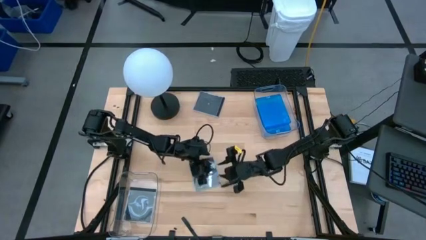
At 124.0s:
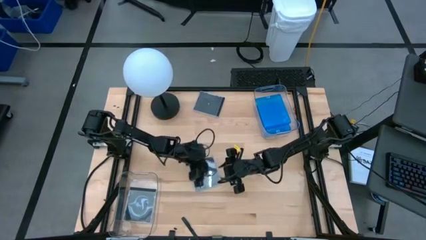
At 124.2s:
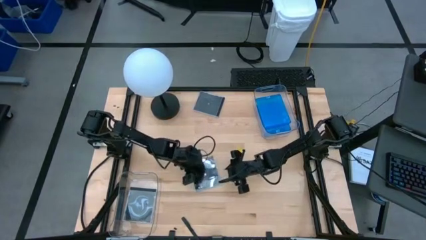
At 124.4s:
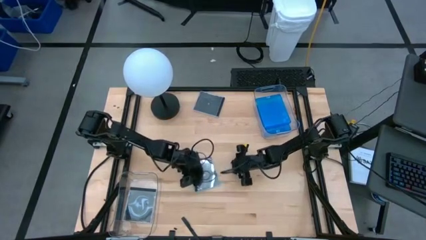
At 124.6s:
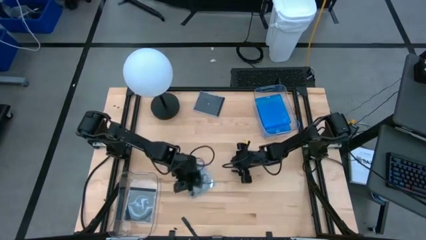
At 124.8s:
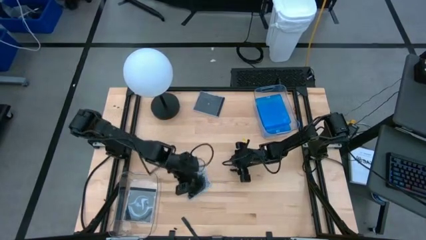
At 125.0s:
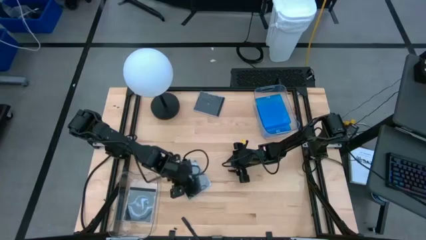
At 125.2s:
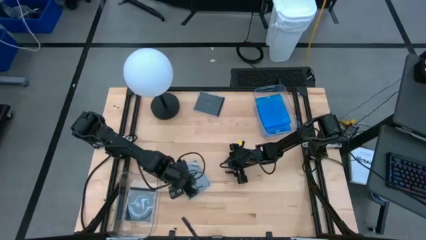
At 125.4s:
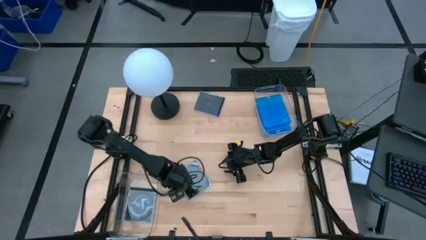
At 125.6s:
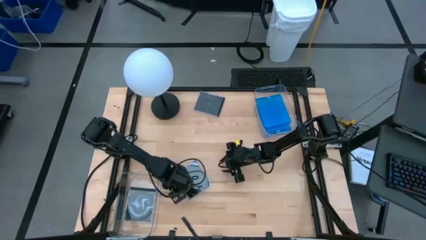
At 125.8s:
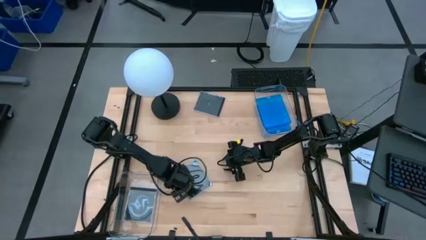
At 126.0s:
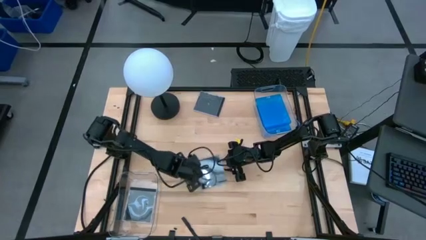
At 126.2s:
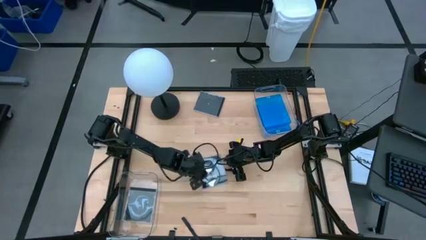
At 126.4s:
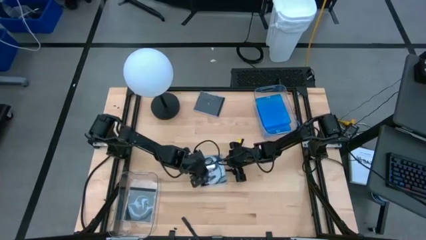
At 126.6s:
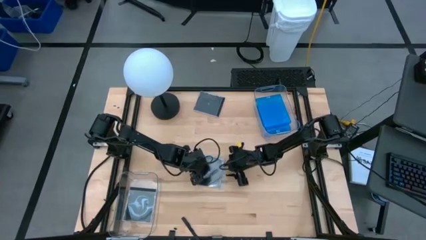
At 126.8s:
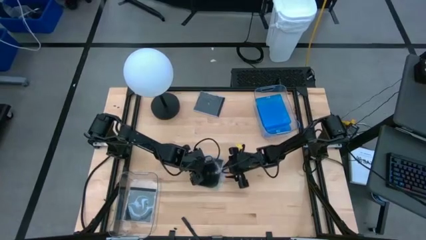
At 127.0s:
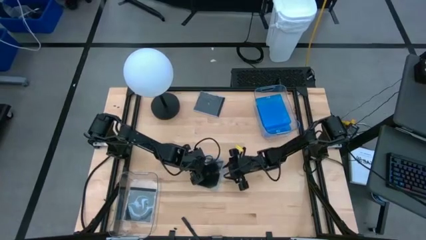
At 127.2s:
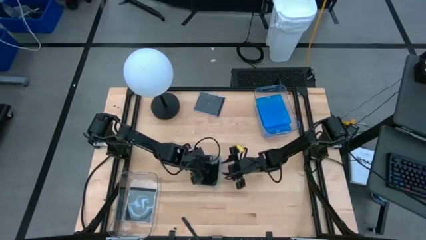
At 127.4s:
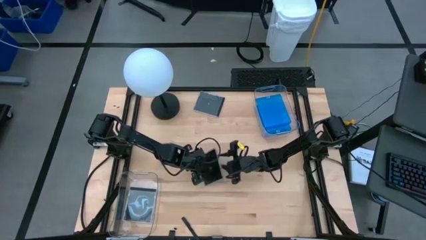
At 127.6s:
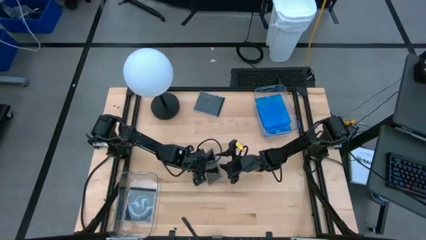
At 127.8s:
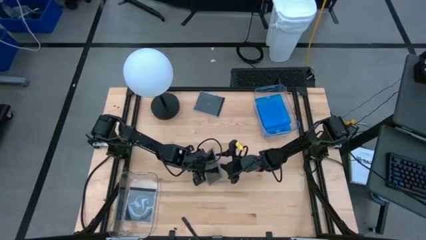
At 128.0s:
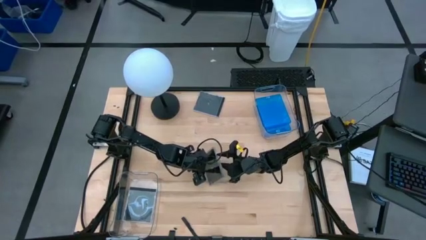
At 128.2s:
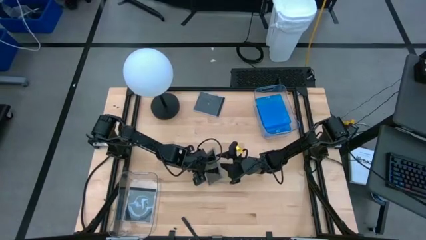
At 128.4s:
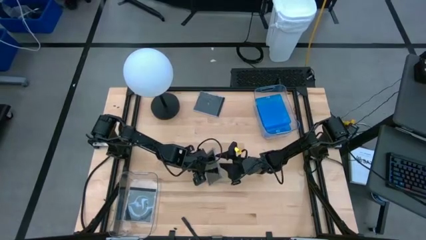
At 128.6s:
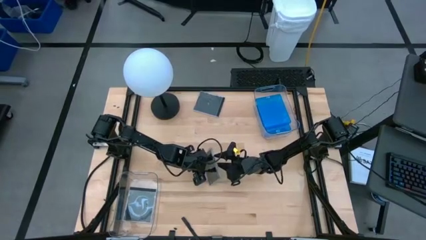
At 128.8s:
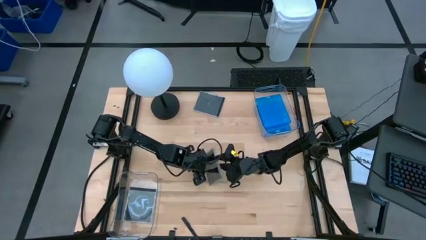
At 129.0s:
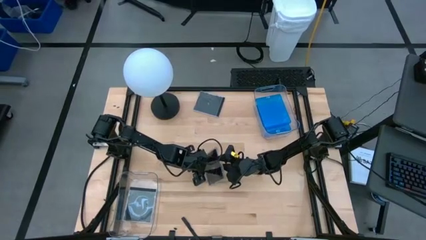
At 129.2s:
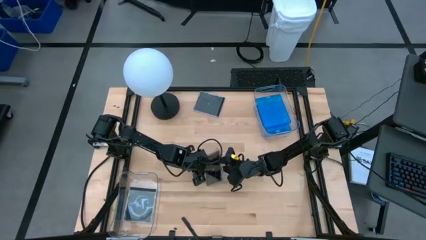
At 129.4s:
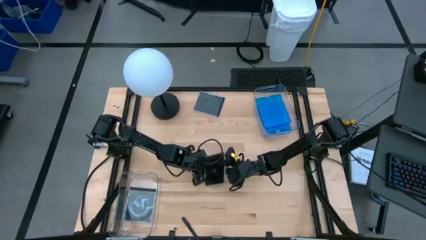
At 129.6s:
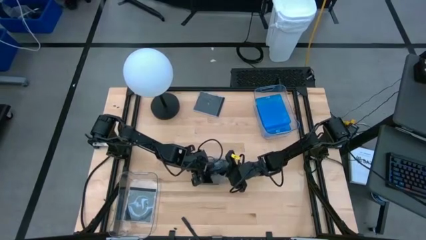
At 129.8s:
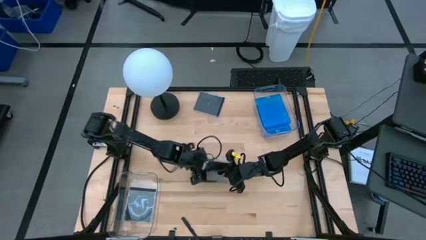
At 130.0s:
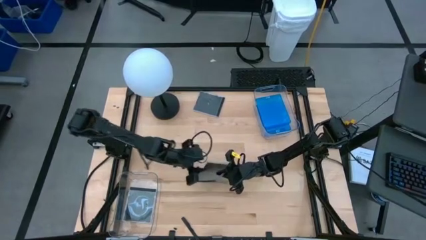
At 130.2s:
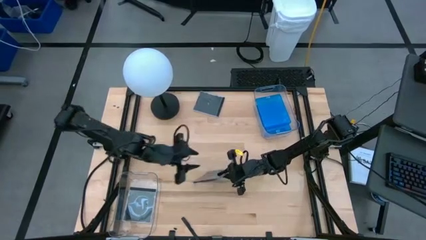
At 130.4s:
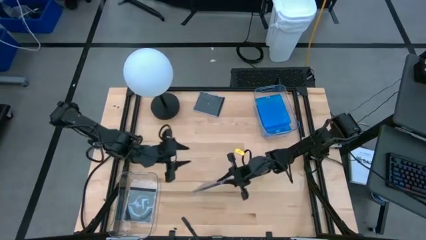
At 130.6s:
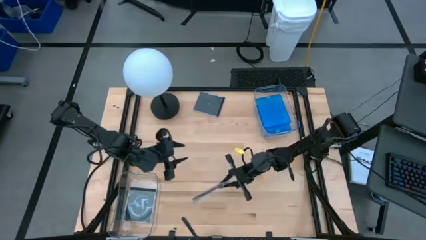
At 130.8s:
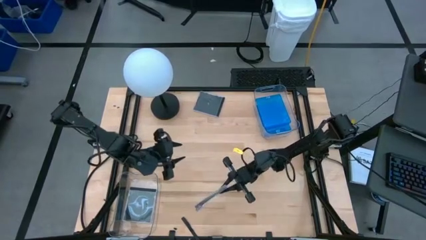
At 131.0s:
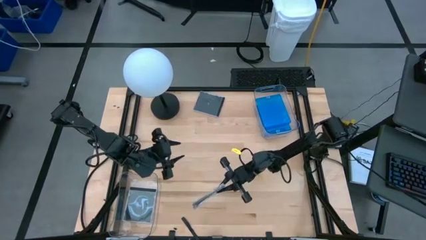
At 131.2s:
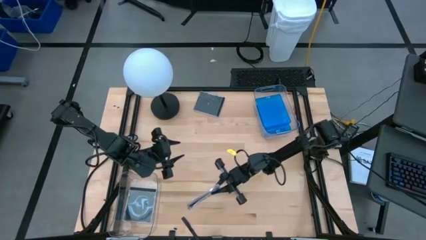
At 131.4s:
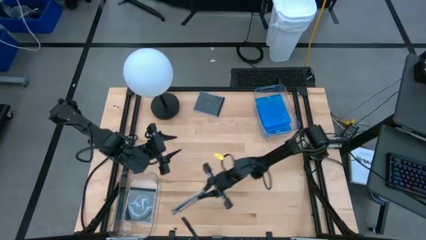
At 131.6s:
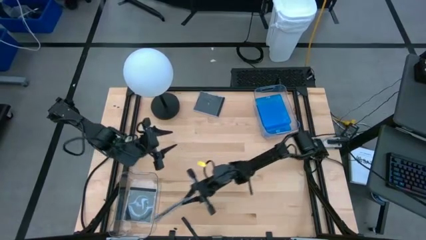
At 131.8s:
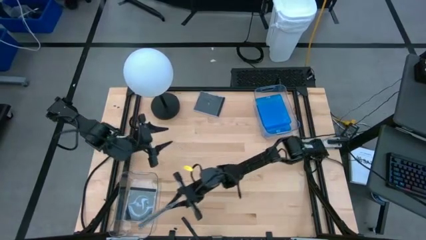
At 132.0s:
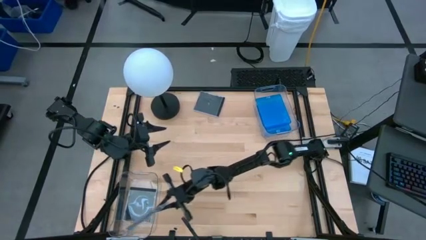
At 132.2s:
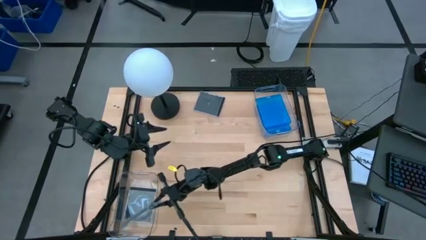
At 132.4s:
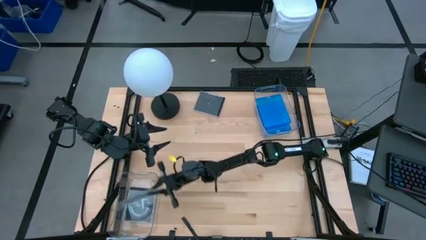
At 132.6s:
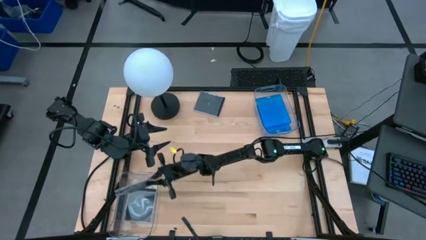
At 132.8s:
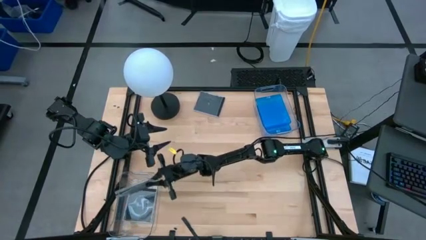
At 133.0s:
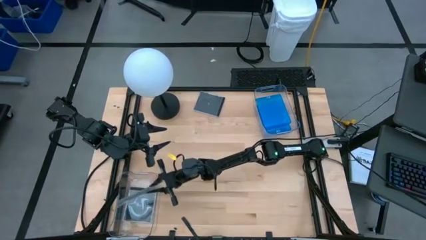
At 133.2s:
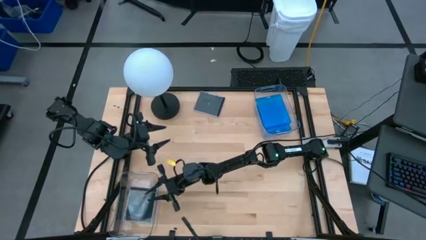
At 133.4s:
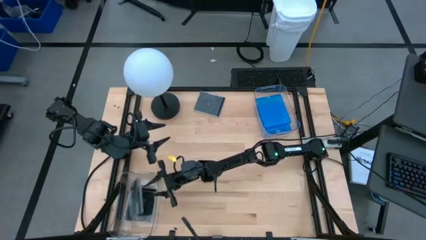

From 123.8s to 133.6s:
Task: Pick & place jewel cases by type
Put the bottom black CD case into the bottom transparent bin

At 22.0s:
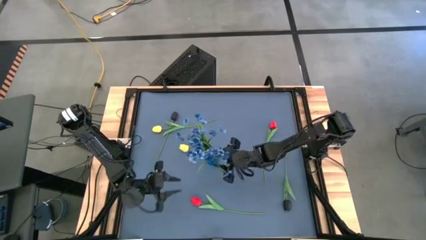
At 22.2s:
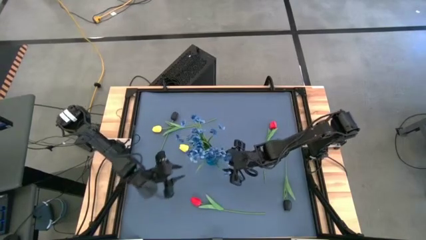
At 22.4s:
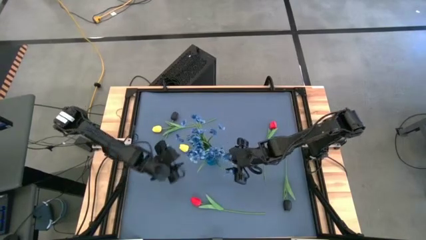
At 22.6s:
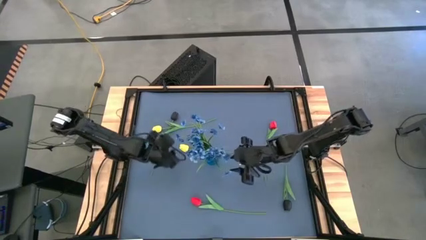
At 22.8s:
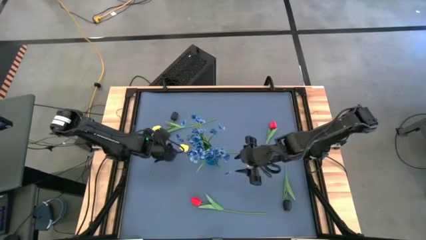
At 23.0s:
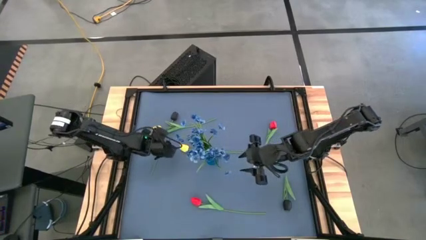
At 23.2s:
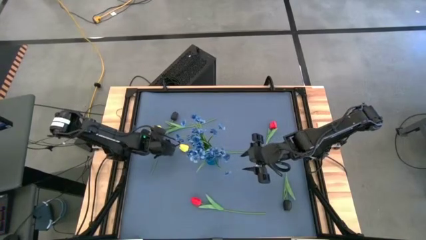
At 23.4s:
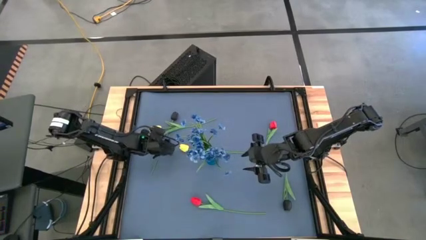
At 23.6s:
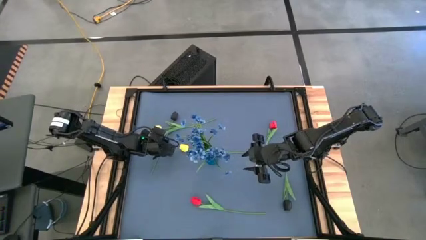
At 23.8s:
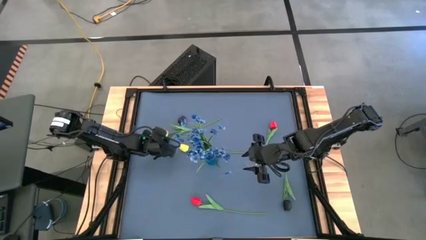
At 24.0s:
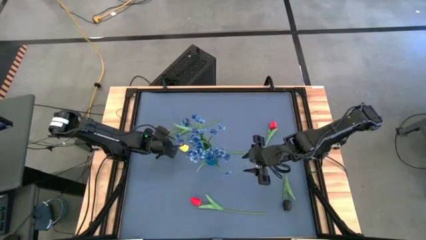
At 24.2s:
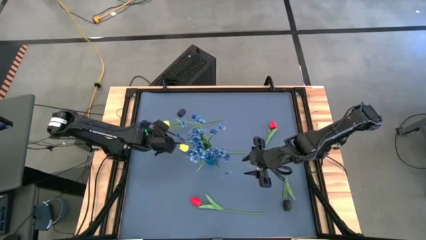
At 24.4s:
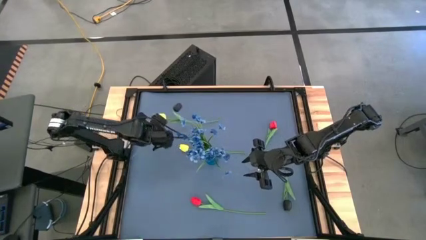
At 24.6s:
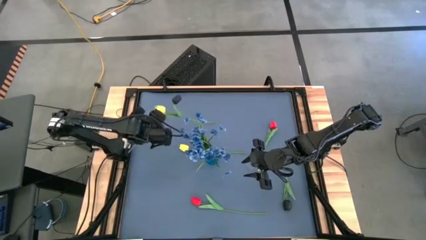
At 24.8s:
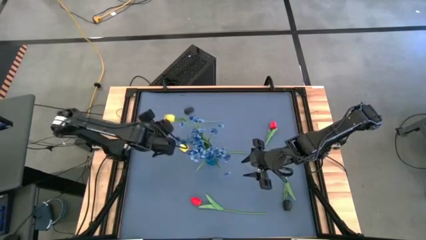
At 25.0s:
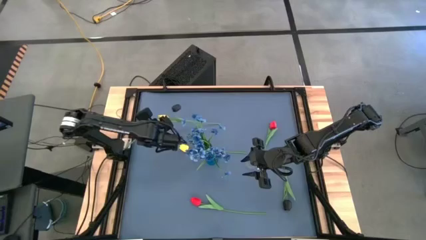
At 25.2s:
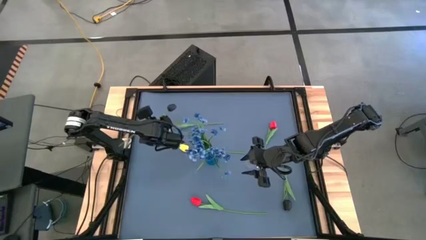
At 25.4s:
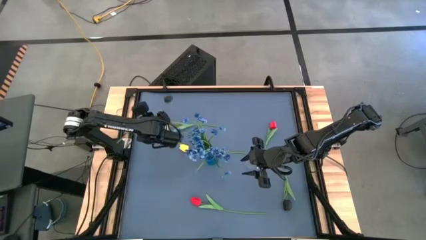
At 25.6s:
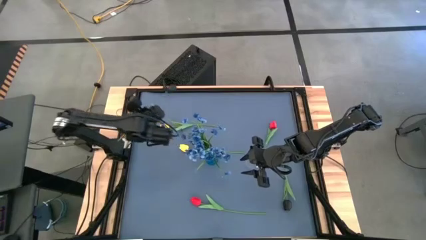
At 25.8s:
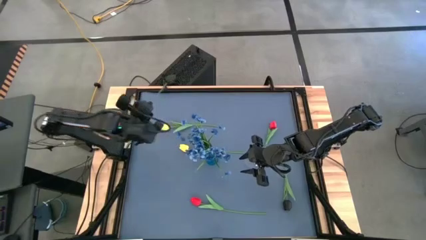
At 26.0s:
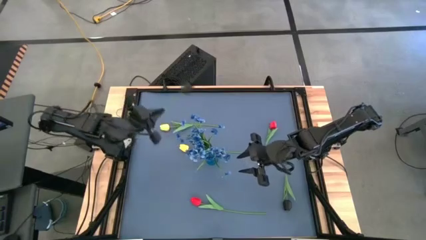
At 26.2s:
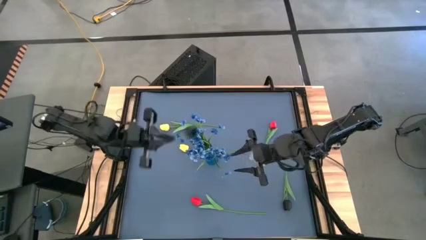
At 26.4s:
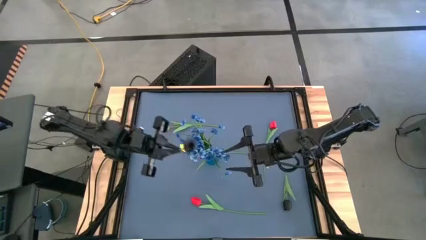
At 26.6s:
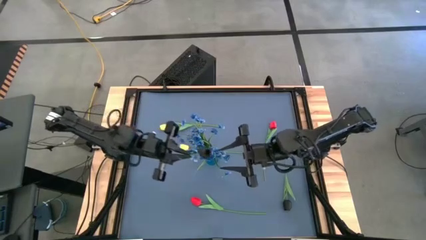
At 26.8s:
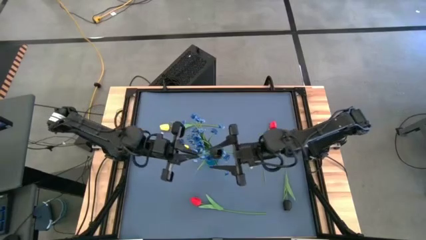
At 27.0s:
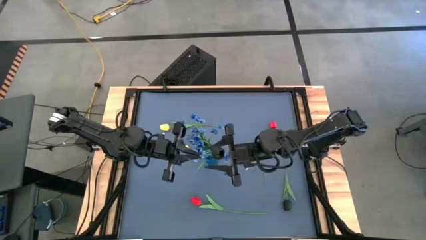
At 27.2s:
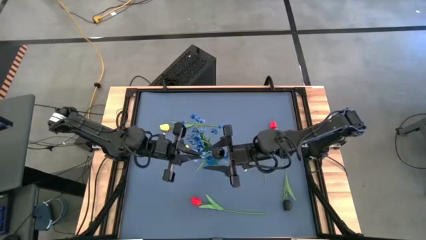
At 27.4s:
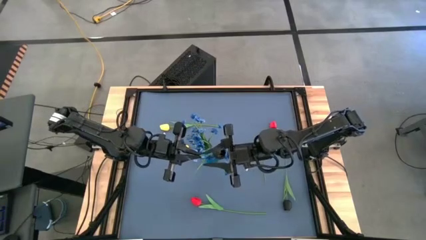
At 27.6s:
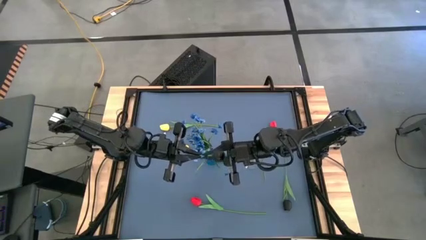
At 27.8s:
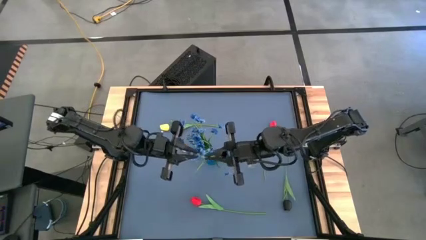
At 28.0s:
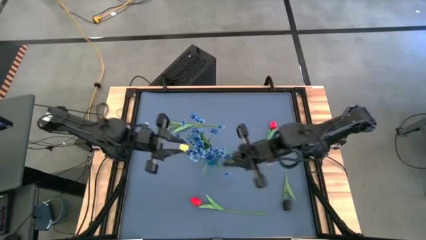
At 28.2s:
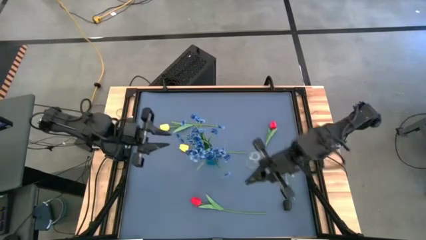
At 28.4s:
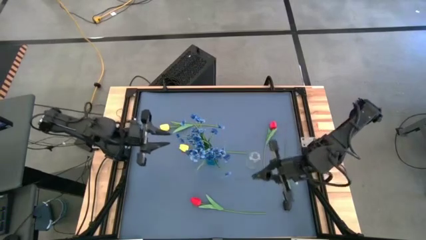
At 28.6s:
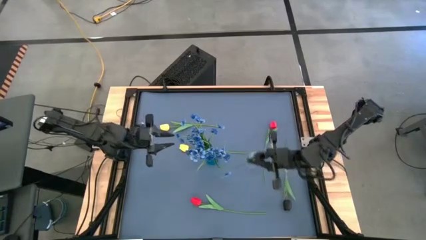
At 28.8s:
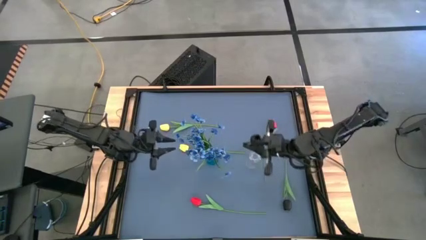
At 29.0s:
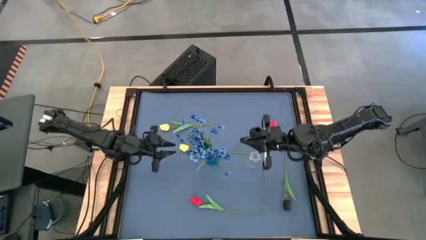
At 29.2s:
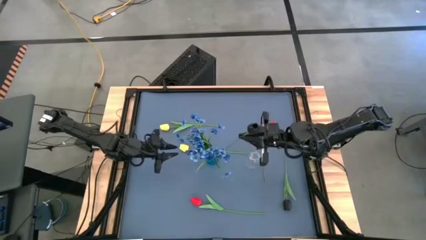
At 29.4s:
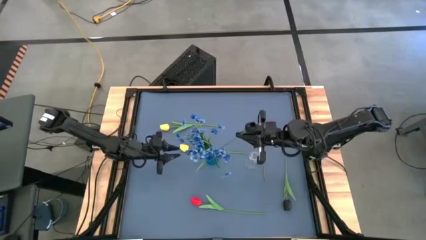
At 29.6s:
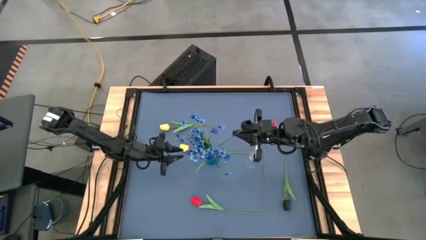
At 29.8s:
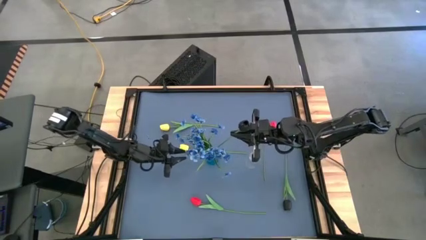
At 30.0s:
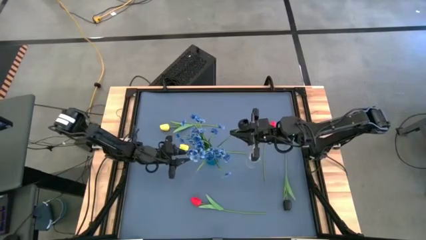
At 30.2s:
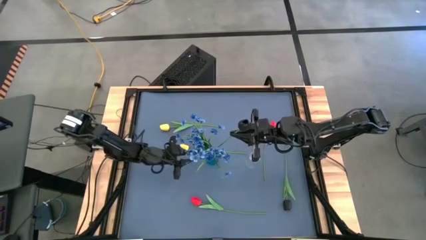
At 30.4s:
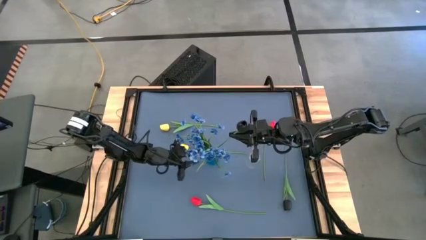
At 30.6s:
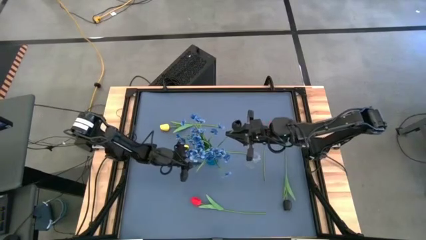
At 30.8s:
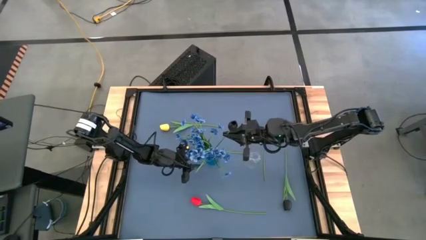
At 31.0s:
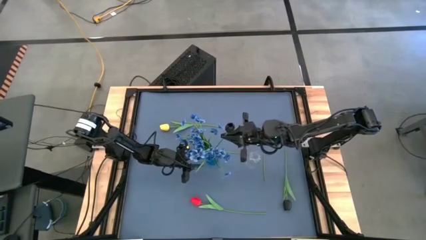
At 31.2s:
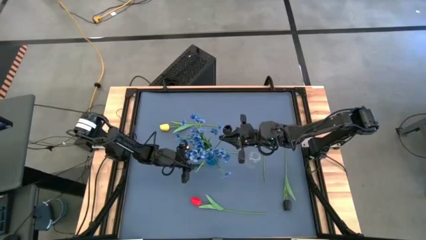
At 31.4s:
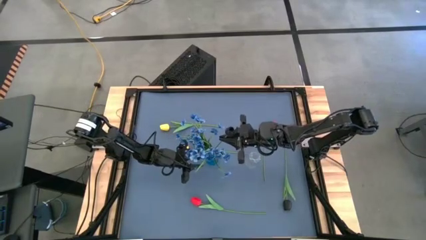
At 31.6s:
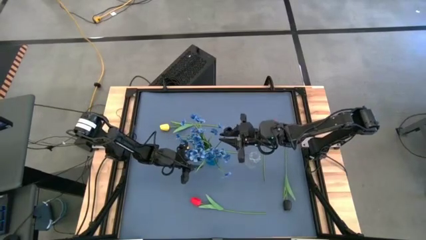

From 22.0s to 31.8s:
Task: Sort flowers into vase by color
Put the top black flower into the blue vase
